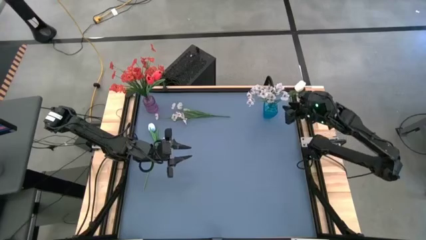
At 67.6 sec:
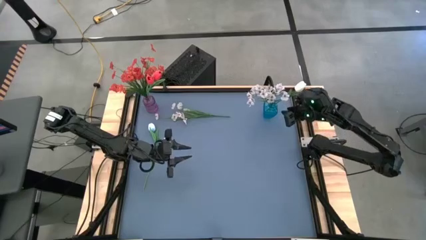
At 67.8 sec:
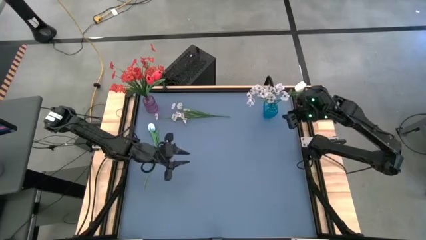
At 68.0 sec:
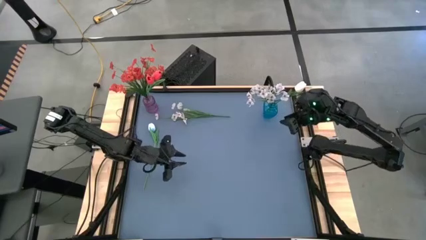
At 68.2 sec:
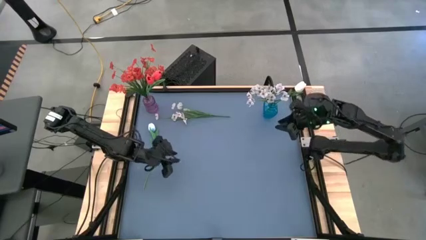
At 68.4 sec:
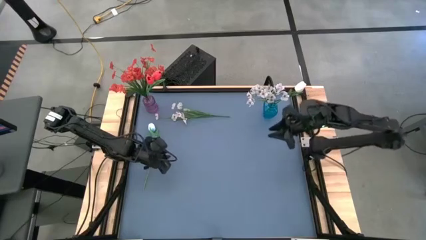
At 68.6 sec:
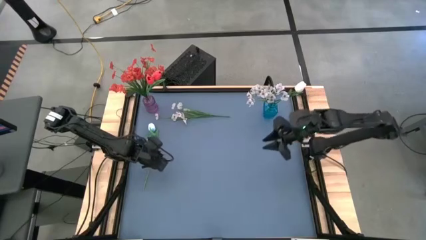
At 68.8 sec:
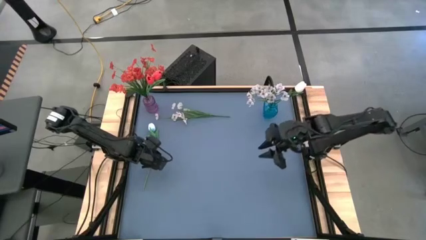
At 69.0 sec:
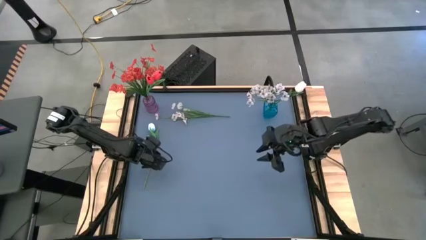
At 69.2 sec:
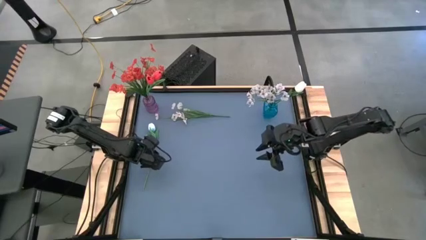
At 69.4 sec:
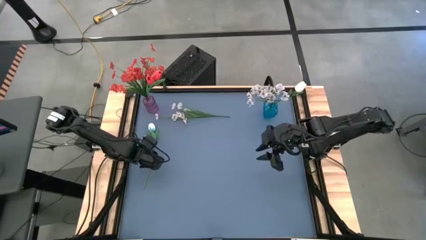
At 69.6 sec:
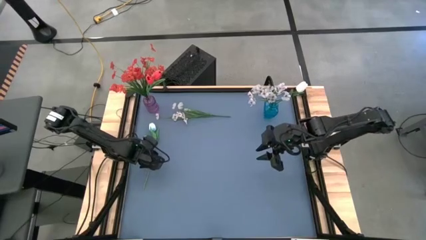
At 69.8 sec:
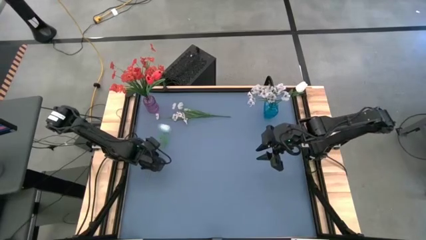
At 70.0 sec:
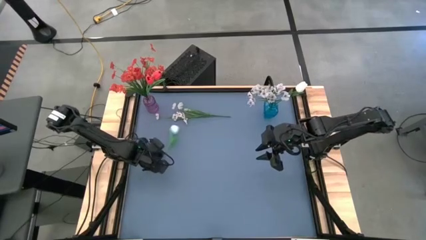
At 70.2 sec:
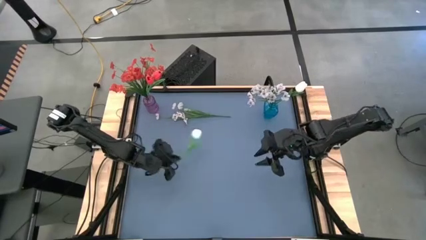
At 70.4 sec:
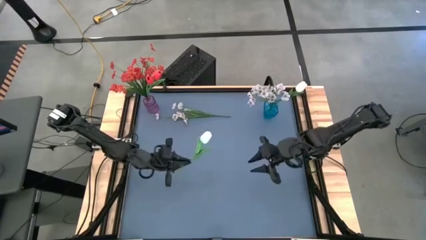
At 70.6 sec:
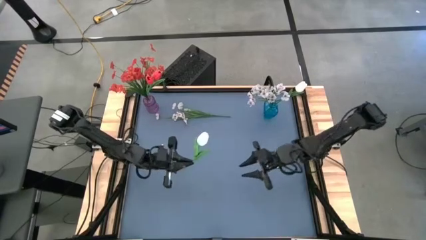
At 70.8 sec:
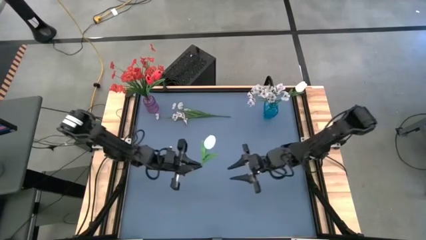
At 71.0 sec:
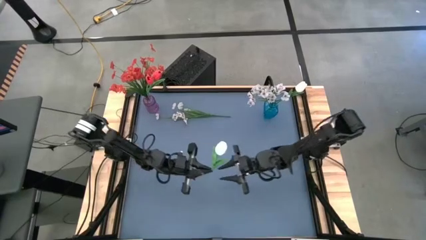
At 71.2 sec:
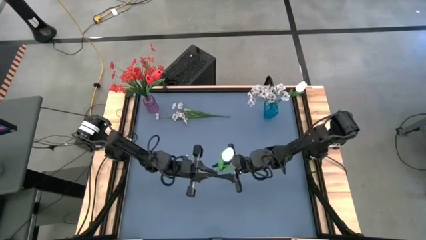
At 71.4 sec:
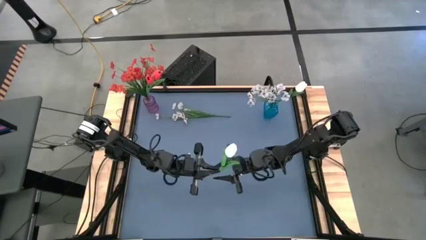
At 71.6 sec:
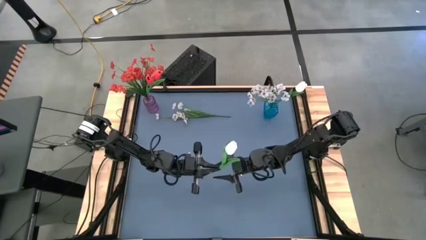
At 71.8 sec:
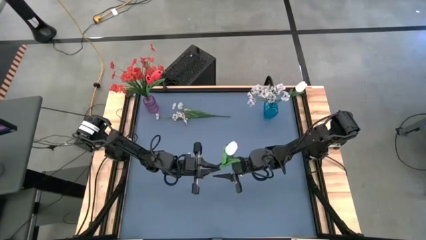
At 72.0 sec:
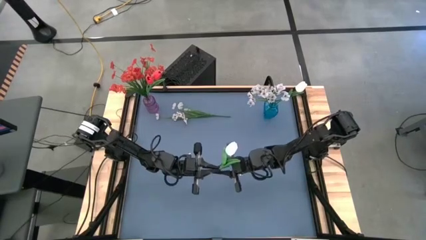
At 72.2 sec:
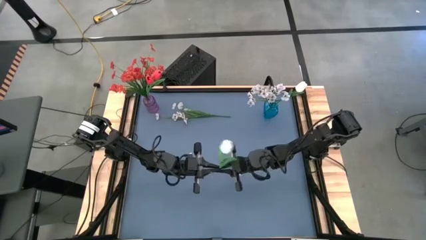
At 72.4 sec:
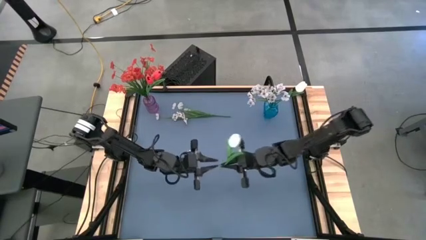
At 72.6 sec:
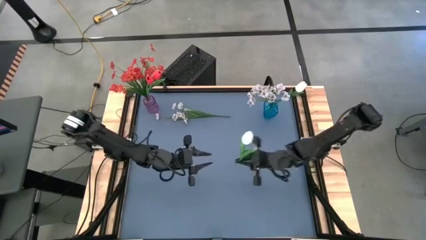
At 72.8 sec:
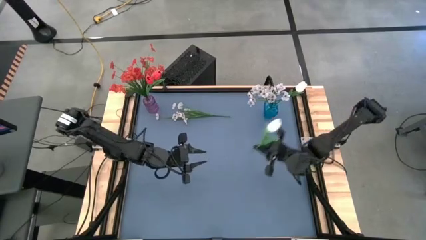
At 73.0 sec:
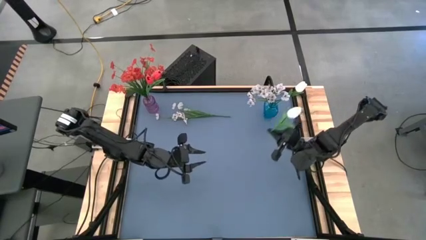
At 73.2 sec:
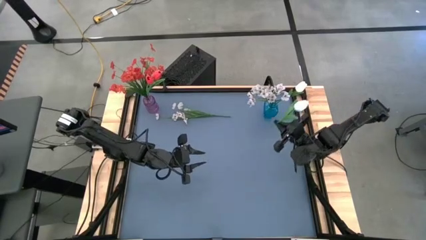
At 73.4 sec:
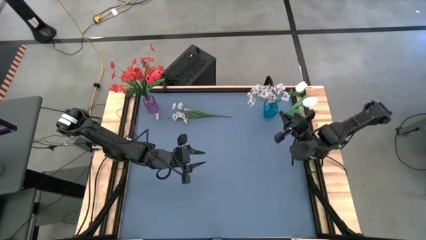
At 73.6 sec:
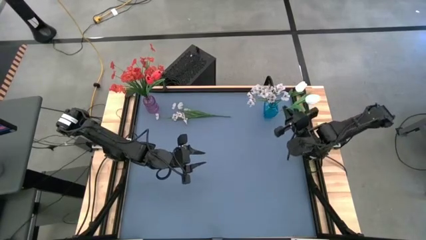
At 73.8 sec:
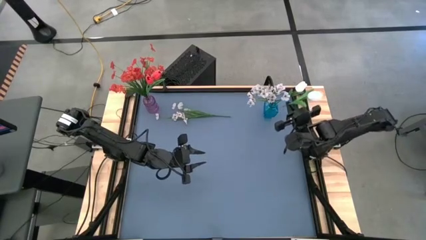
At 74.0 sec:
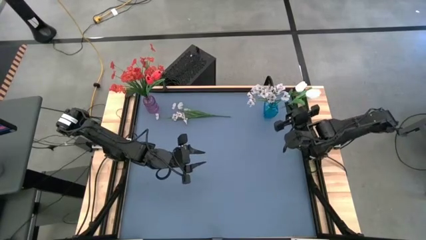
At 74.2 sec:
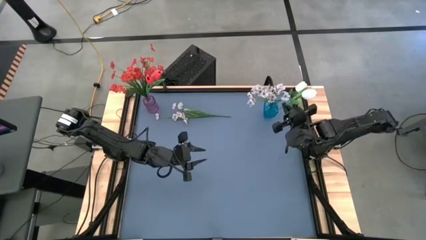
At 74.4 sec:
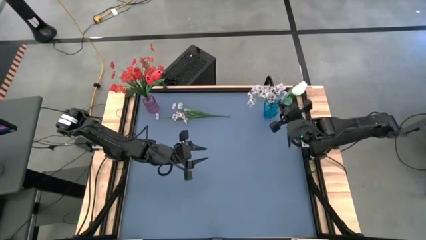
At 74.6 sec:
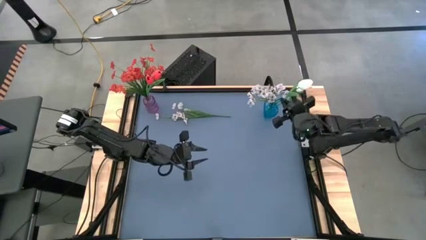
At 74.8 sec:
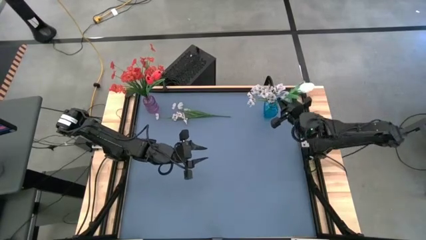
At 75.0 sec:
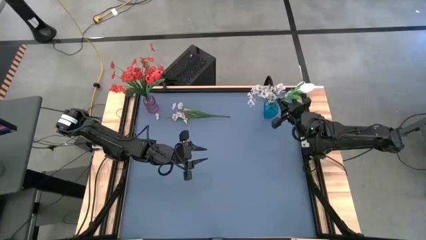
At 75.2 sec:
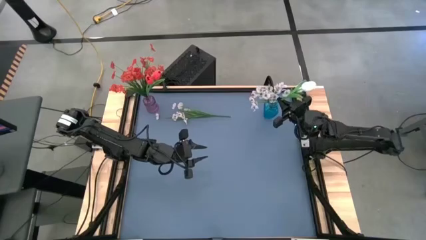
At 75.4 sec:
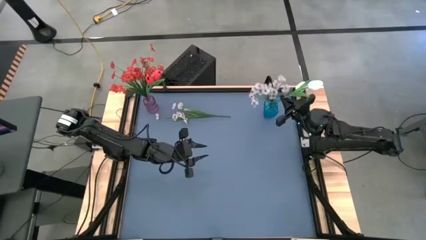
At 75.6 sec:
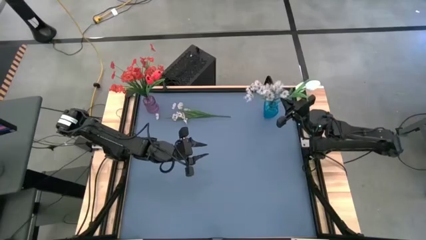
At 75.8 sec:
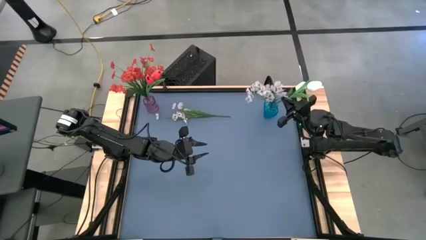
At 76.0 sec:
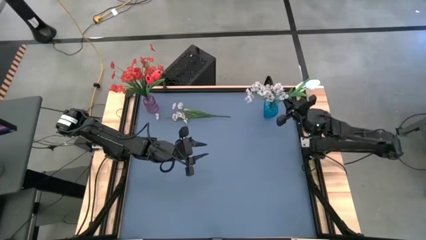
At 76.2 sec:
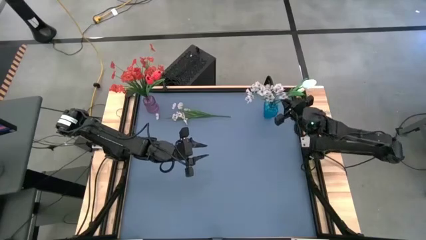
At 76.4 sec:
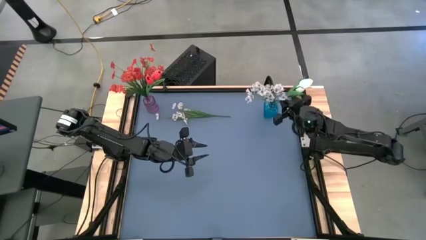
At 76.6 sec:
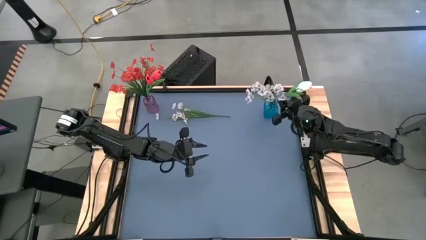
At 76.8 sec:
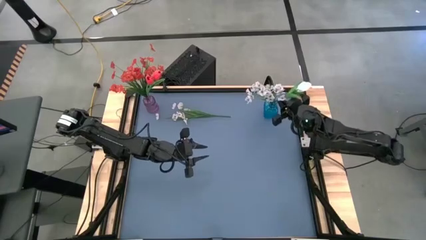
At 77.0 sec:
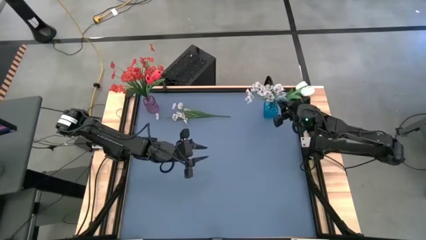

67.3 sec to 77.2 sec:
Task: Sort flowers into vase by color
Put the white flower into the blue vase

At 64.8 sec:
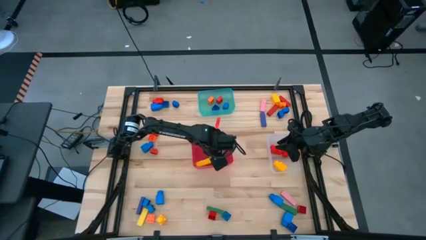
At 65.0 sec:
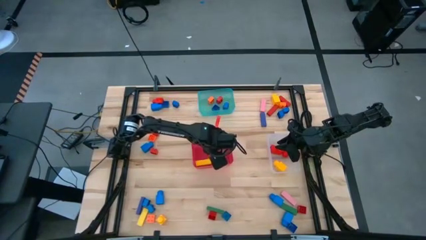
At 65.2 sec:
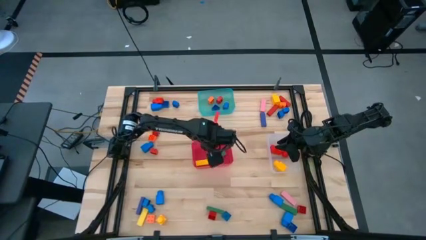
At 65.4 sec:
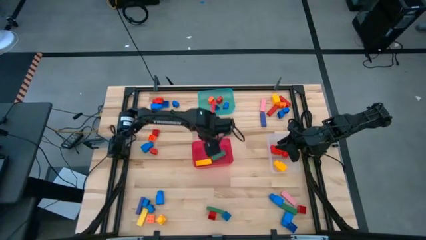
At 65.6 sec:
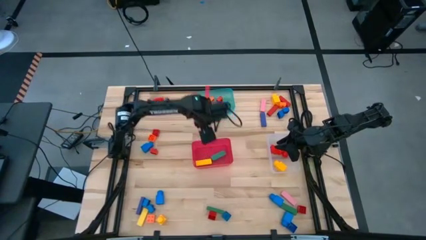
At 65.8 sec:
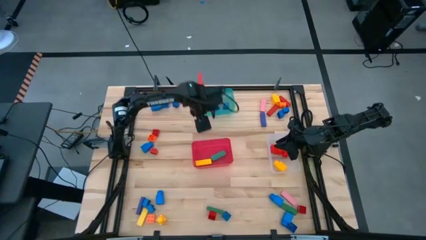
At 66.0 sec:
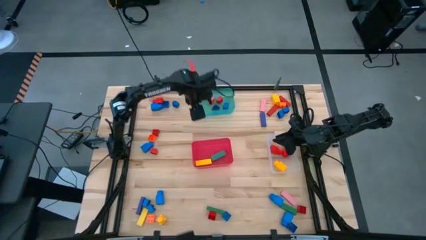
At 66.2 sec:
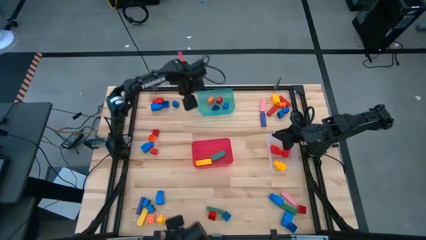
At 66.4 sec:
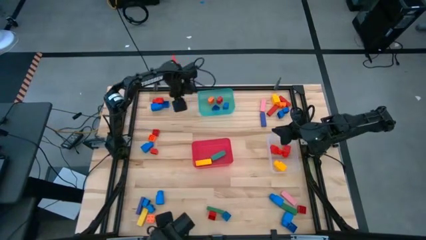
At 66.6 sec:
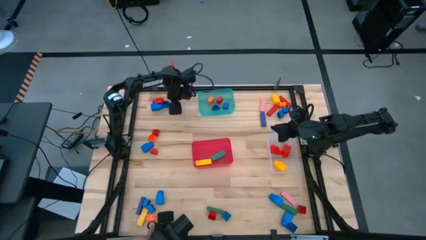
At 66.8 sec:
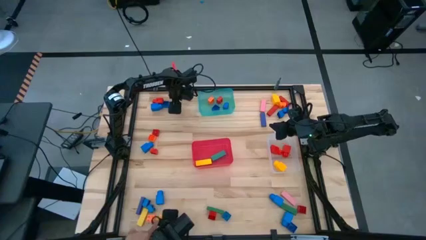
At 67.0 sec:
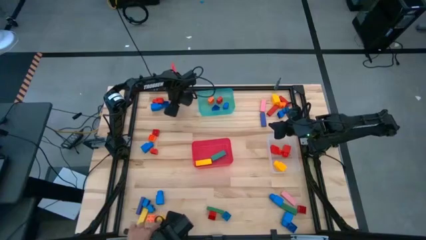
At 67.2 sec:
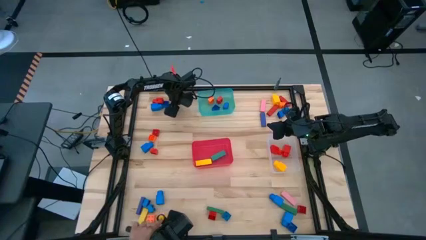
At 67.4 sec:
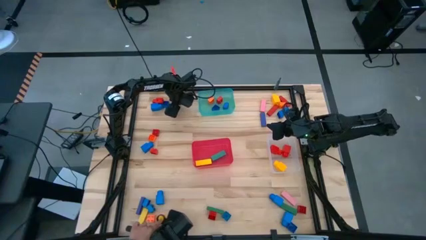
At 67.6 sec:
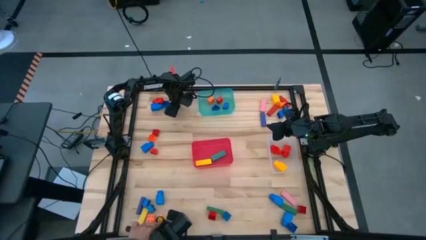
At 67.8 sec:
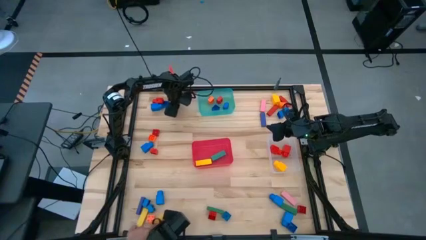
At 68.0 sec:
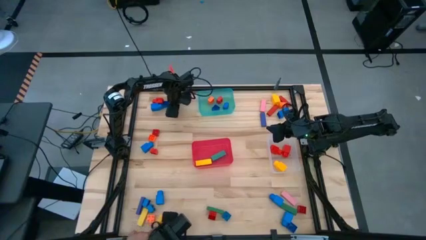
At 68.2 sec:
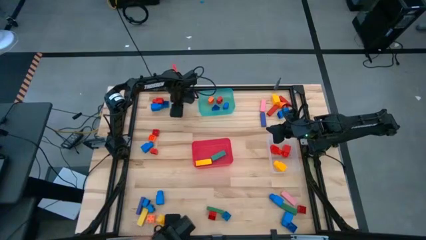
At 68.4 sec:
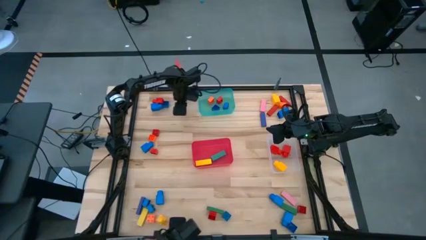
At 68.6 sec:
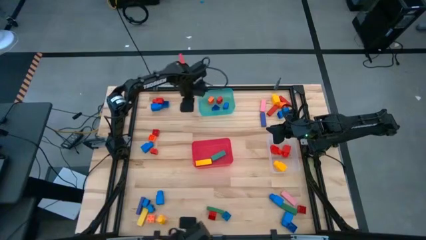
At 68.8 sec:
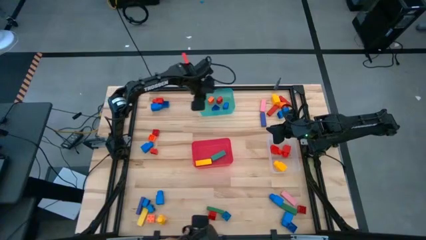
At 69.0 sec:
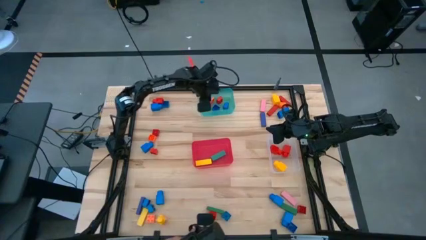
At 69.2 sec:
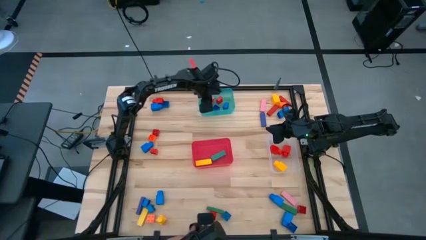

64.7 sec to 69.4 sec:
Task: Sort blocks by size
Put the blue 4 stud game piece into the blue bin
